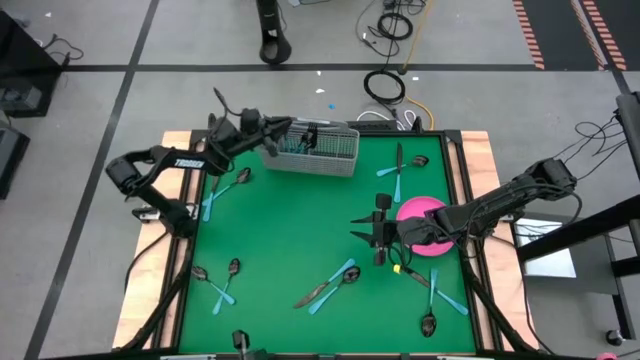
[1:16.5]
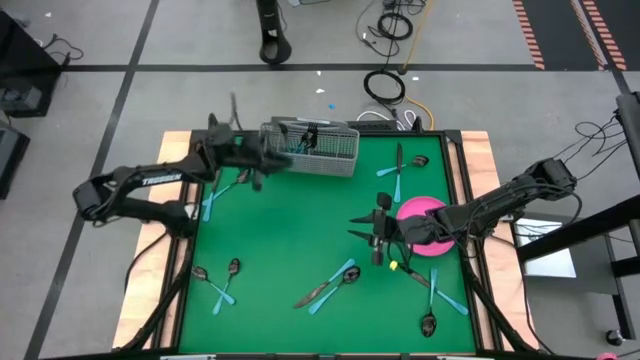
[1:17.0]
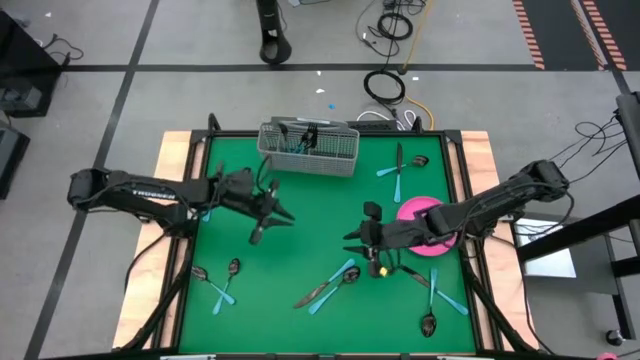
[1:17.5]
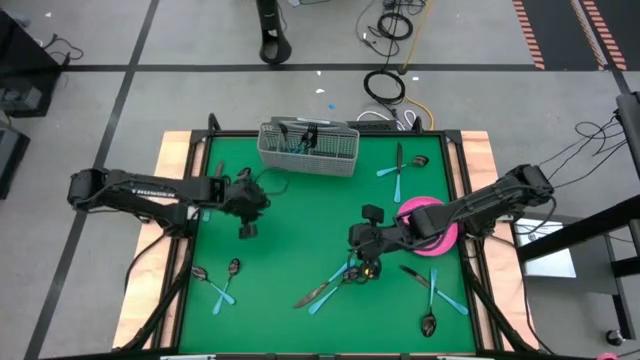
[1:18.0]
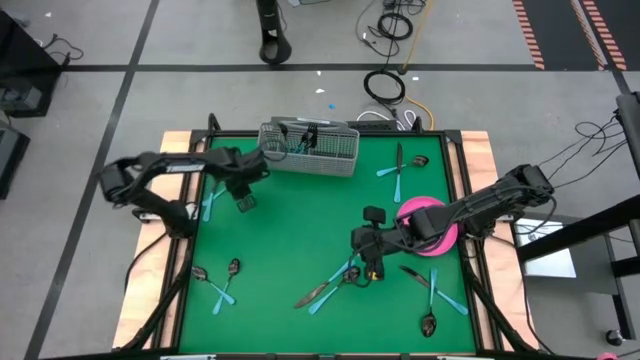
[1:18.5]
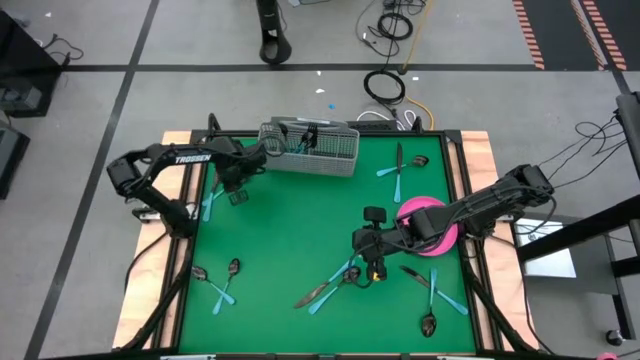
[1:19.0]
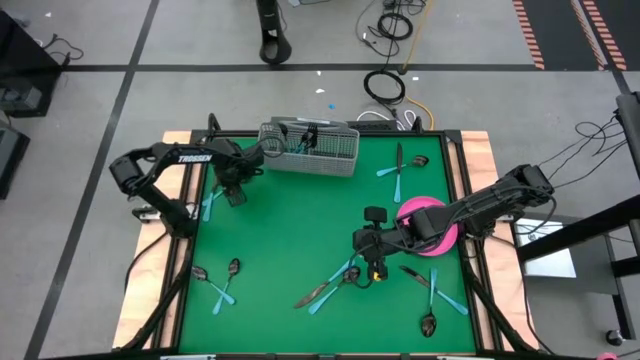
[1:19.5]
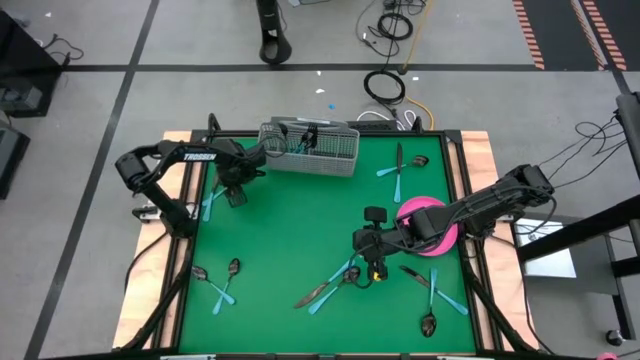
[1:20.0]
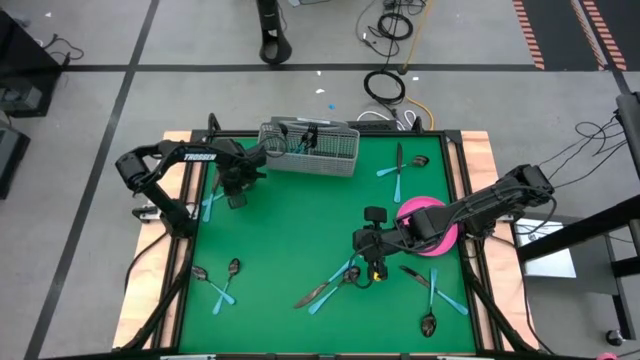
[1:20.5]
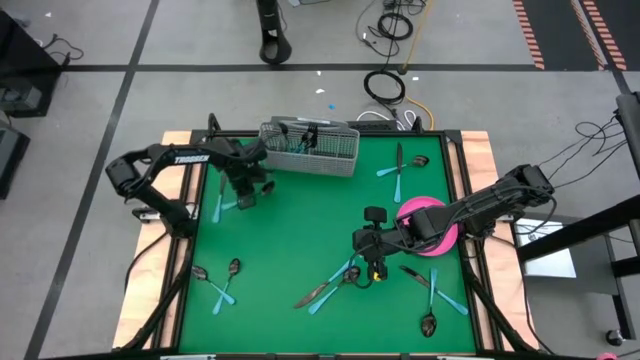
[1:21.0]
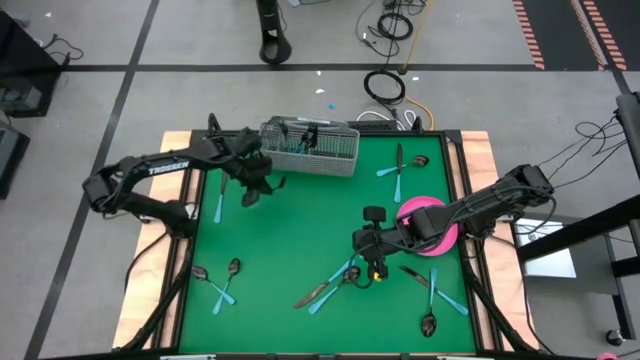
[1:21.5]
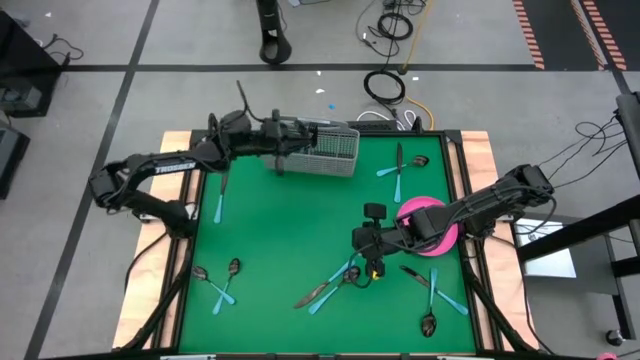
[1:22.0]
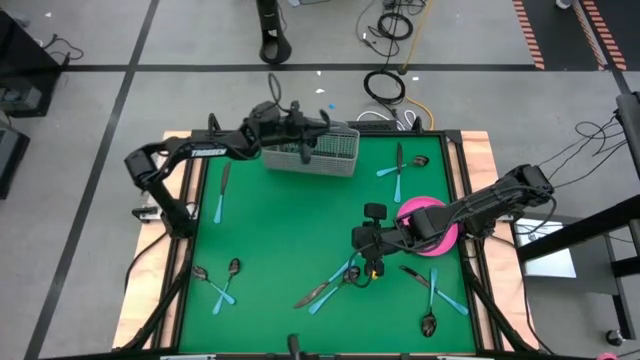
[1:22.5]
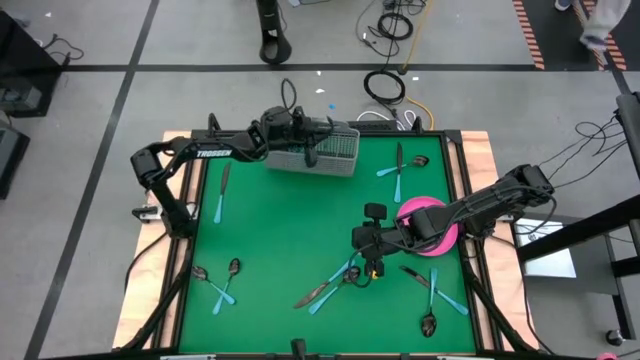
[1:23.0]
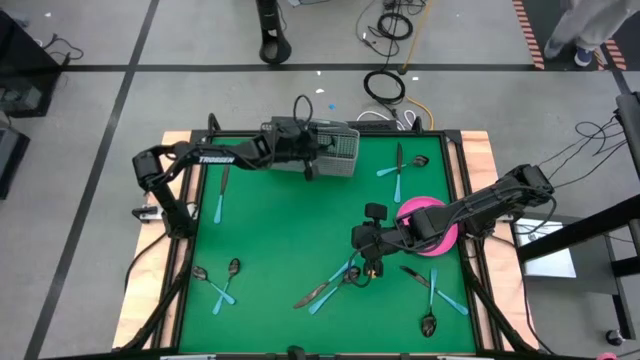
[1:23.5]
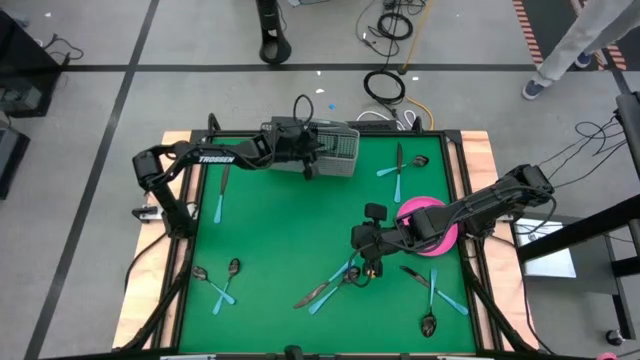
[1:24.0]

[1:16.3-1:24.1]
Task: Sort silverware
Put the blue spoon into the silverware tray

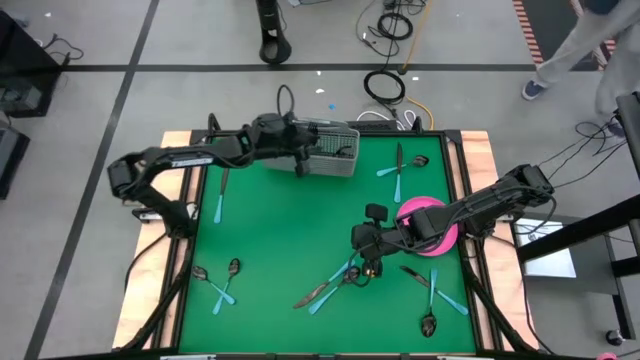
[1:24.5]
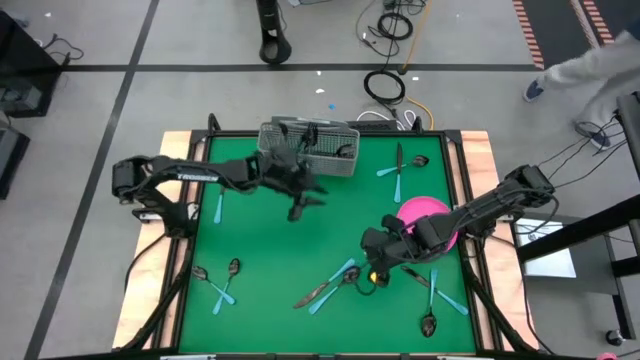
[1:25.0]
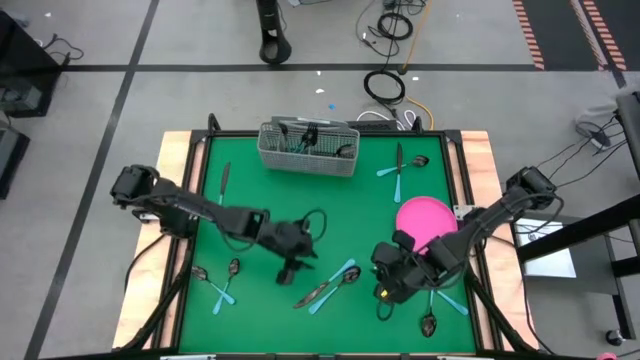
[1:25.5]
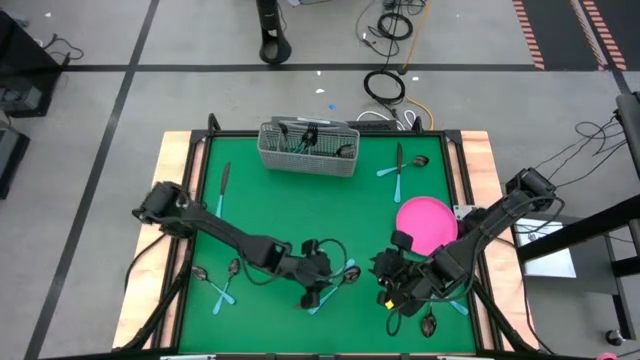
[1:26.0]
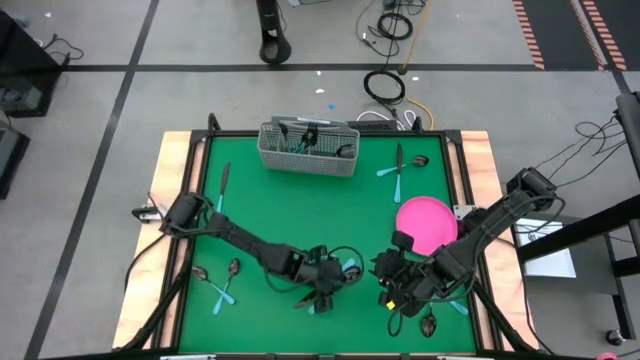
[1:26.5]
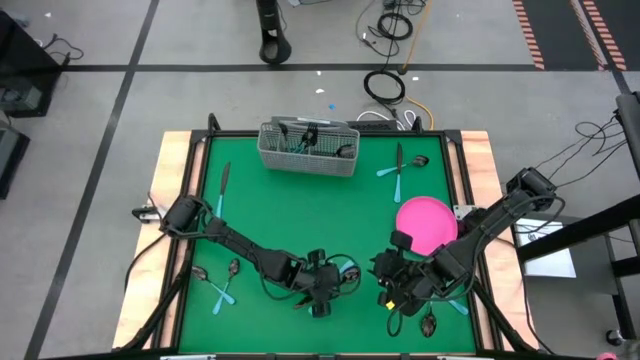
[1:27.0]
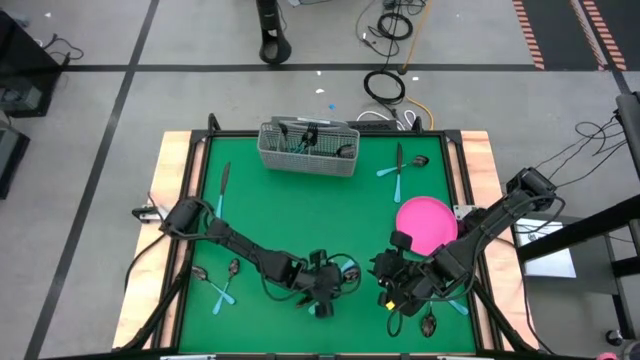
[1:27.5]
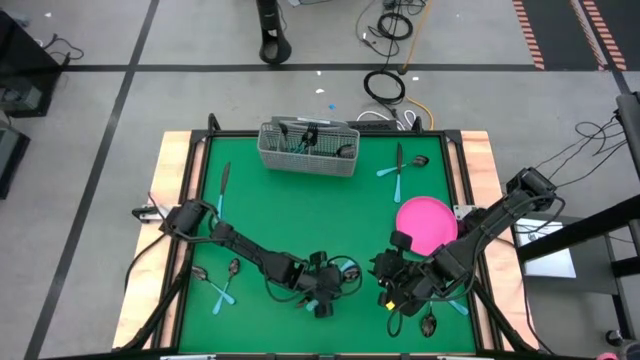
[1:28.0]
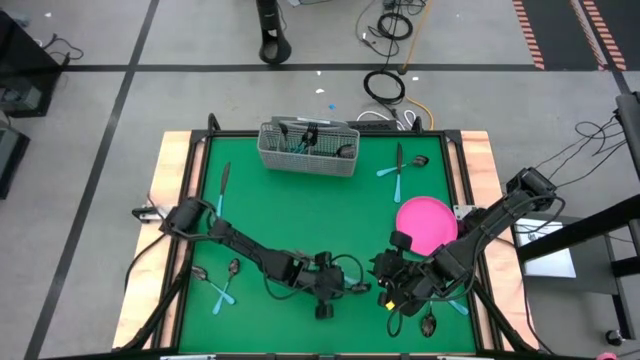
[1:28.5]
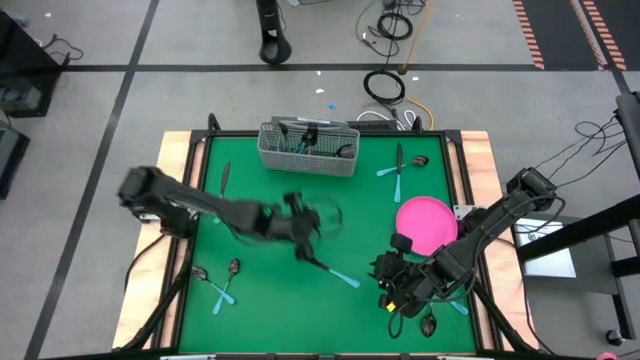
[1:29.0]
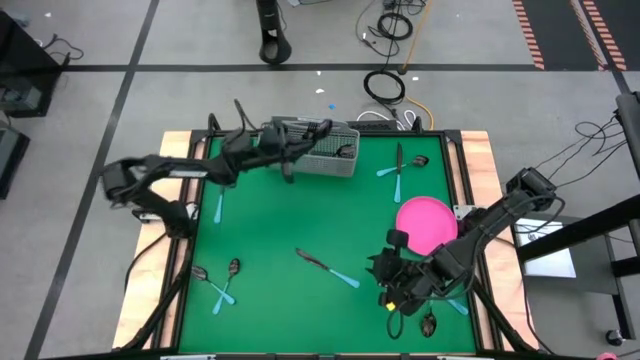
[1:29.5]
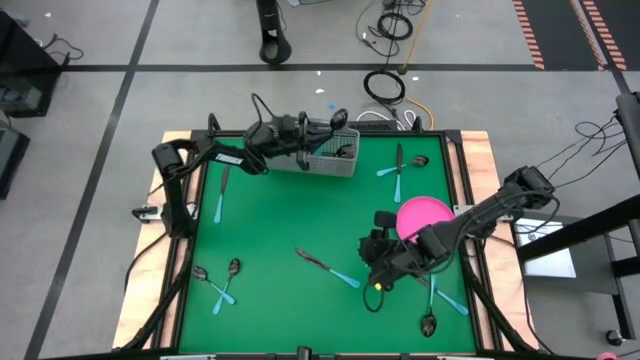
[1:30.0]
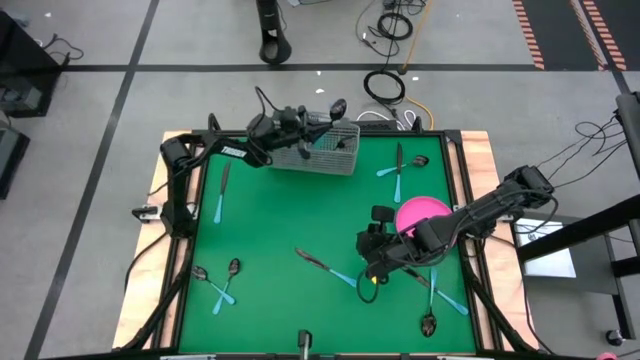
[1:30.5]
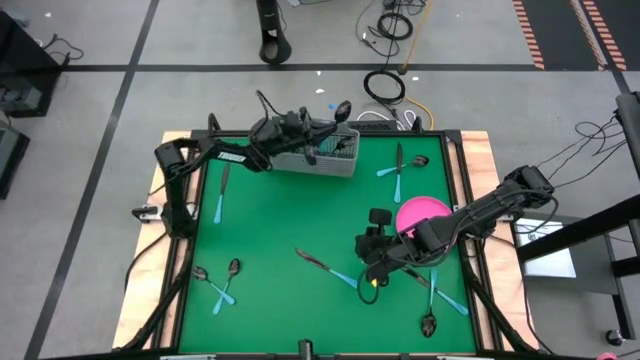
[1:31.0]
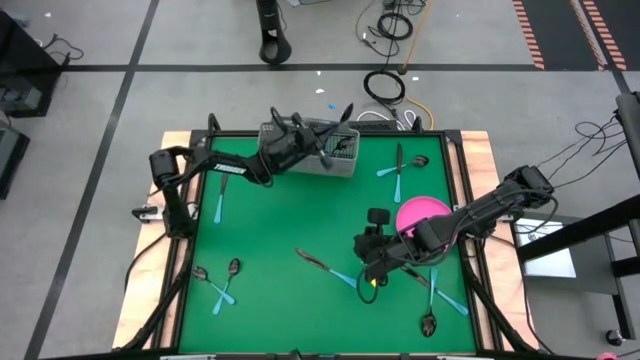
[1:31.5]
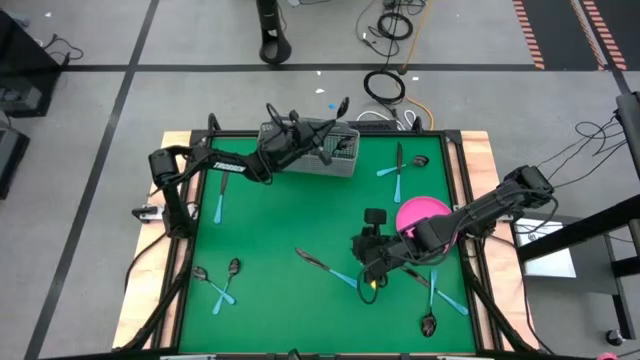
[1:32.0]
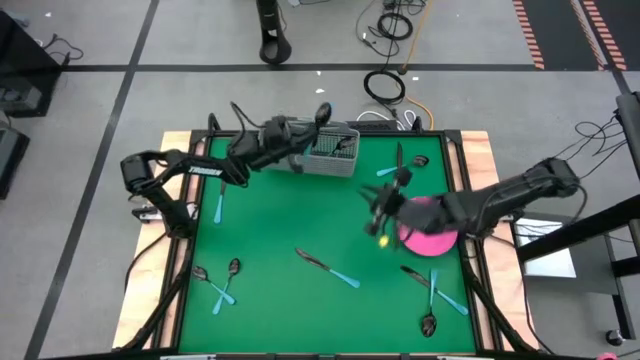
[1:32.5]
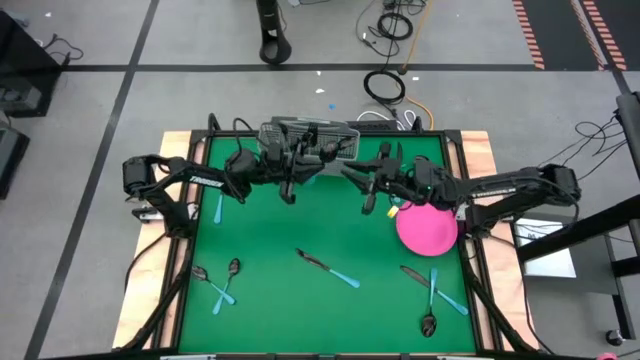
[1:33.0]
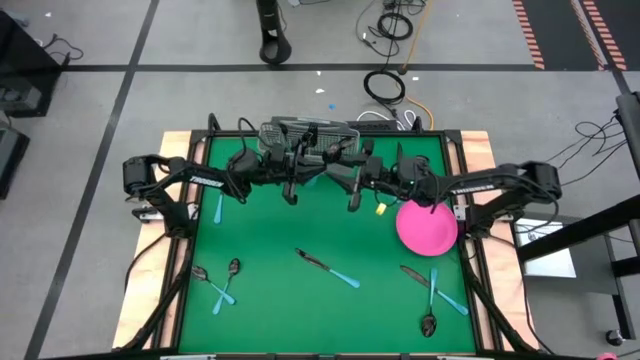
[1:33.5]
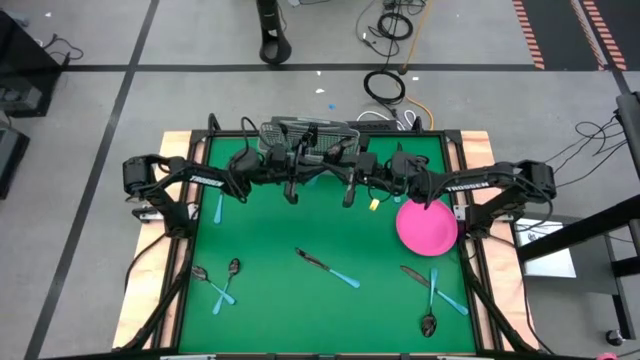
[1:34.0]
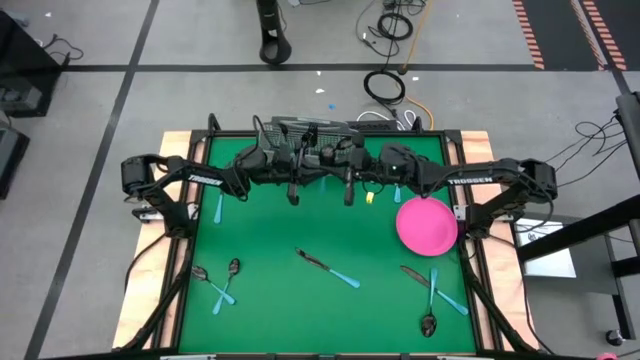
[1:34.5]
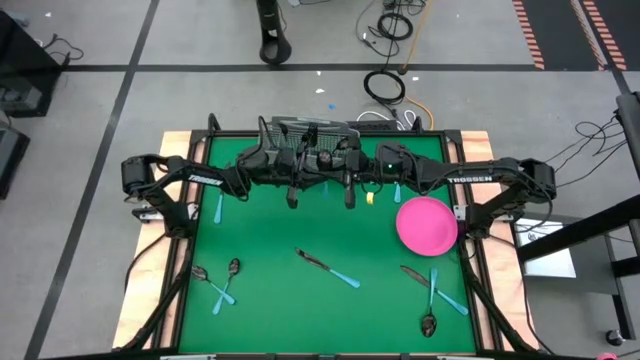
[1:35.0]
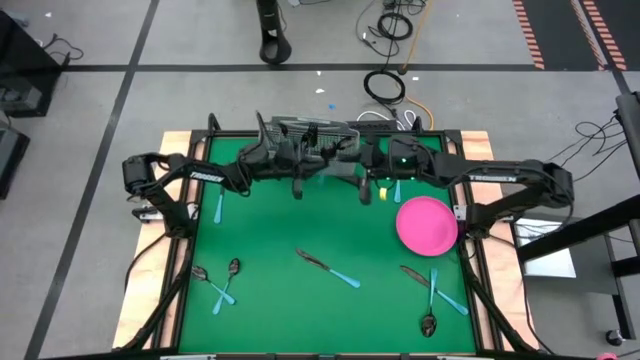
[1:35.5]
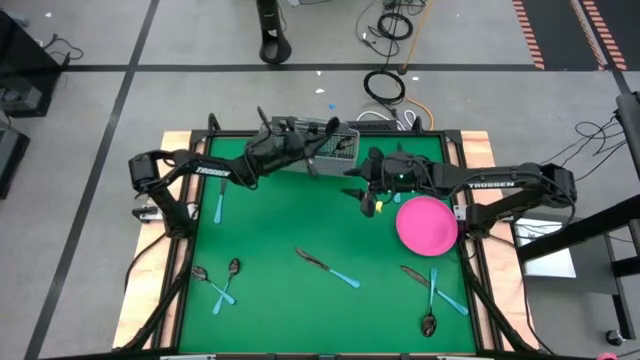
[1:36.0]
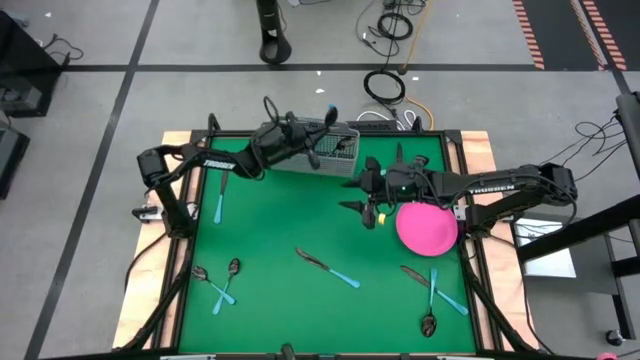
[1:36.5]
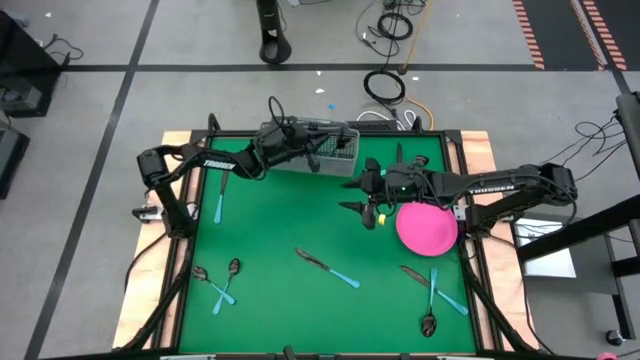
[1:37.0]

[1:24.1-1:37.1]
Put the blue spoon into the silverware tray with the other blue spoon

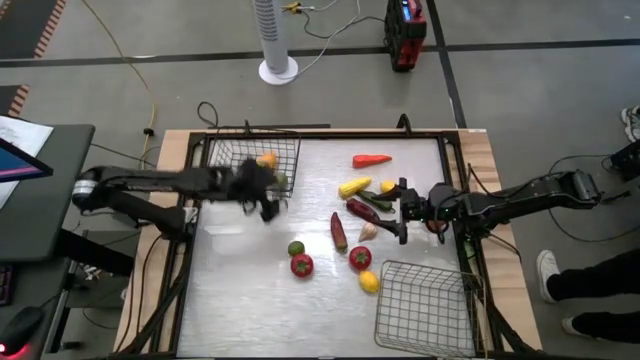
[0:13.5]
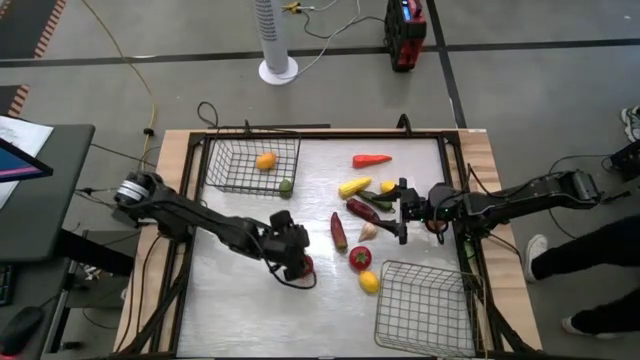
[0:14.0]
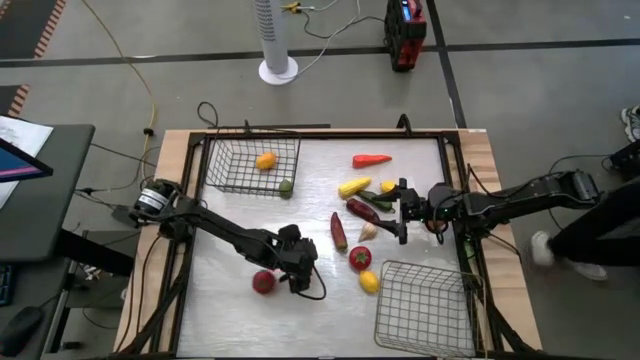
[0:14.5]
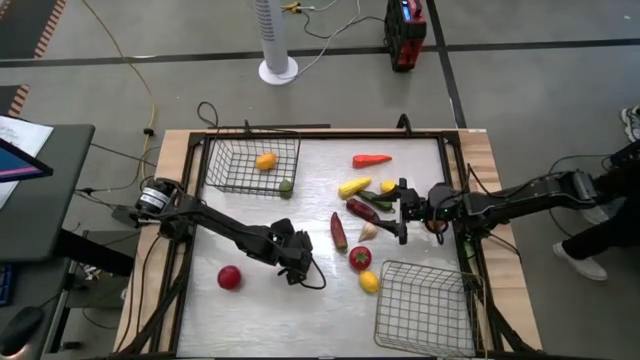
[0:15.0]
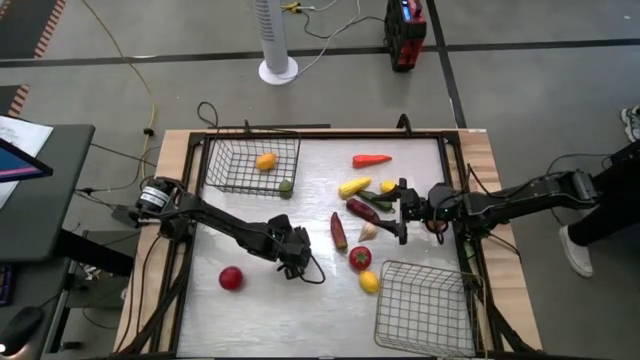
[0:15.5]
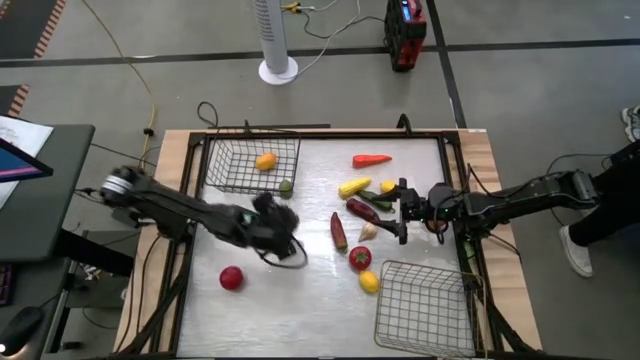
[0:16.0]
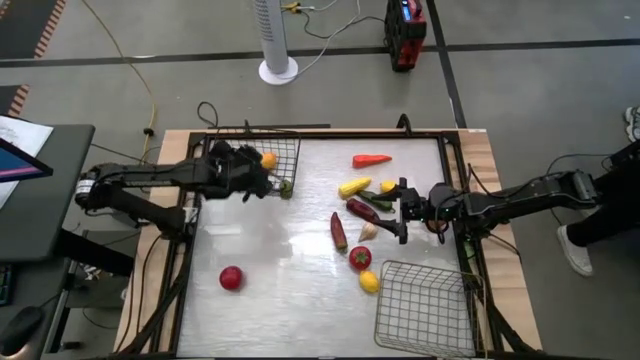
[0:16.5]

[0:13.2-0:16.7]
Task: Sort produce into baskets
Put the lime into the black wire basket
